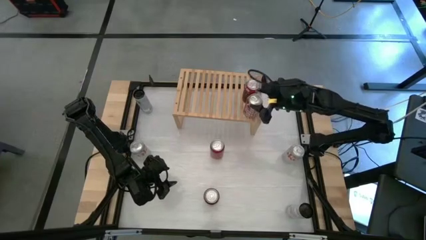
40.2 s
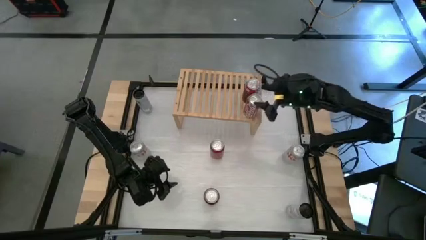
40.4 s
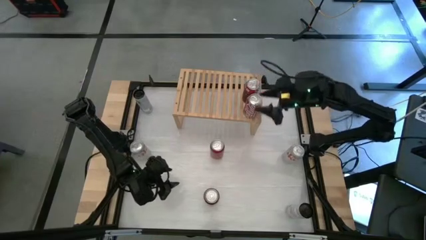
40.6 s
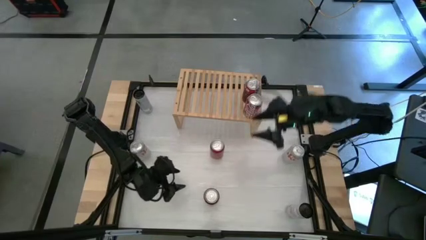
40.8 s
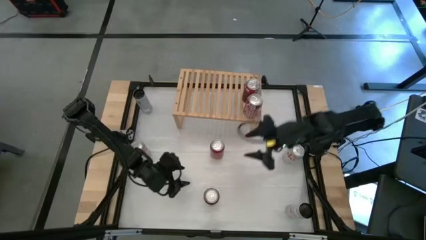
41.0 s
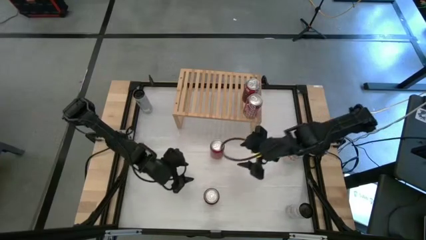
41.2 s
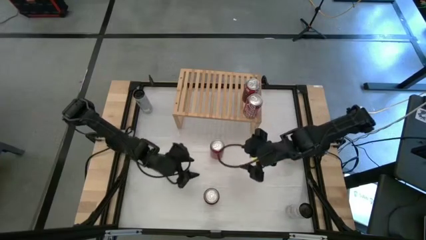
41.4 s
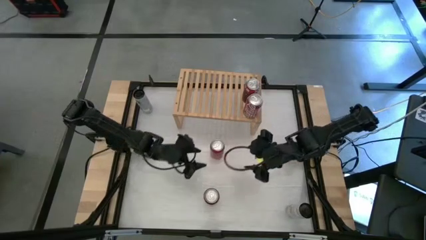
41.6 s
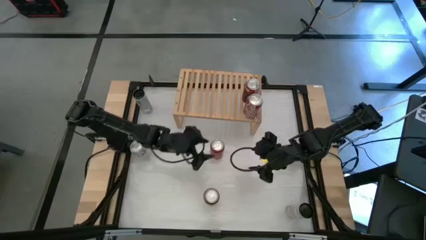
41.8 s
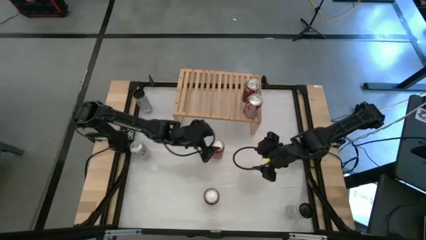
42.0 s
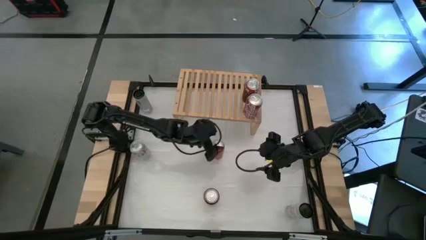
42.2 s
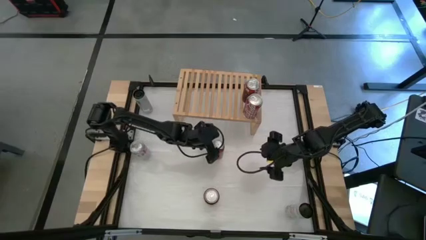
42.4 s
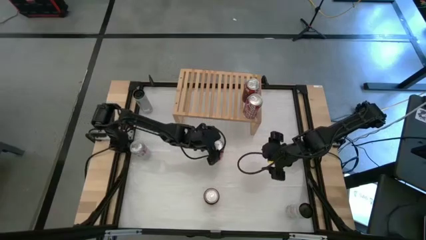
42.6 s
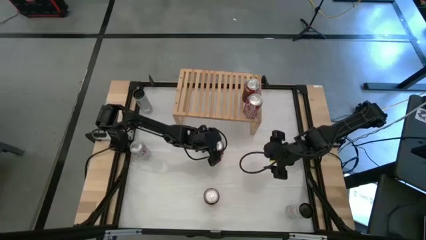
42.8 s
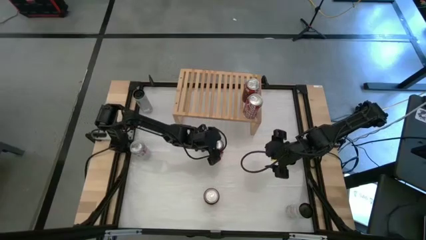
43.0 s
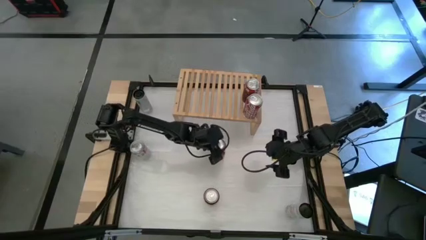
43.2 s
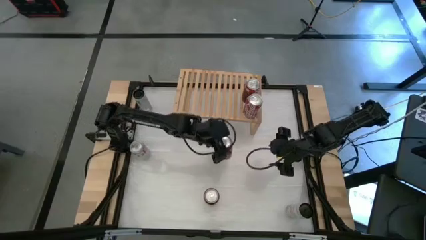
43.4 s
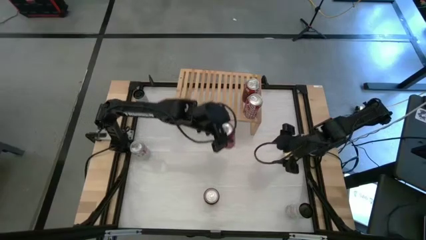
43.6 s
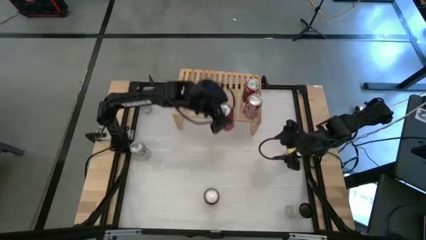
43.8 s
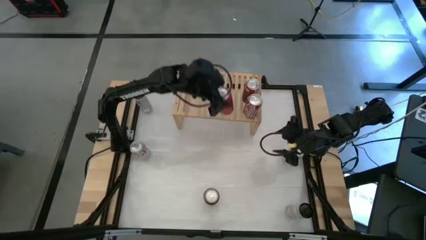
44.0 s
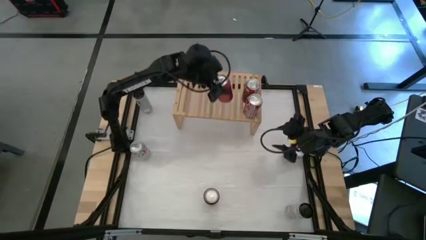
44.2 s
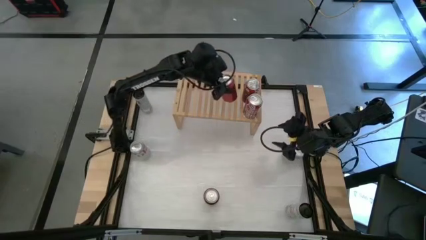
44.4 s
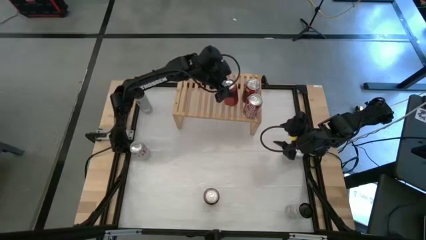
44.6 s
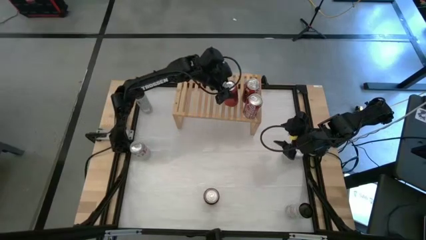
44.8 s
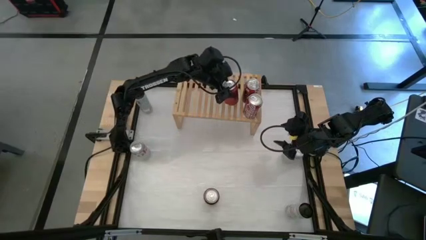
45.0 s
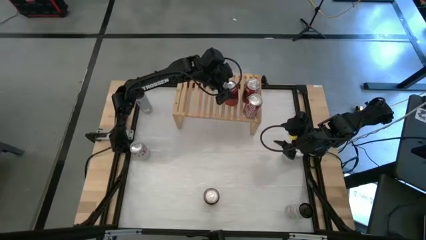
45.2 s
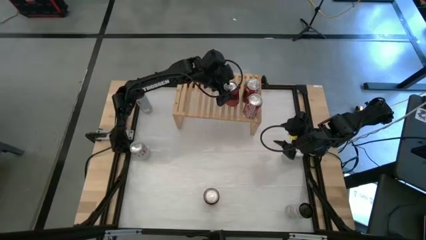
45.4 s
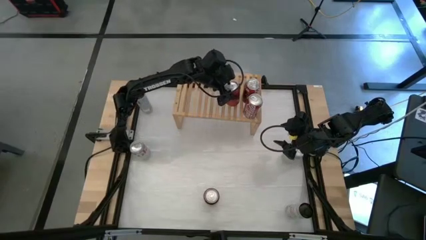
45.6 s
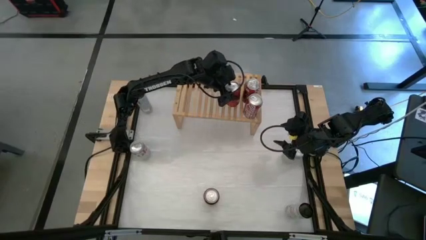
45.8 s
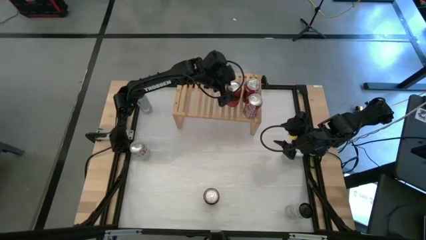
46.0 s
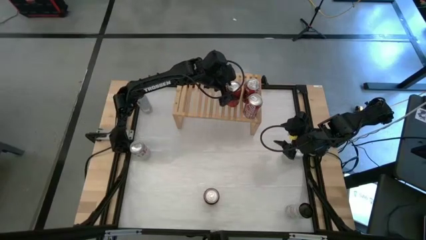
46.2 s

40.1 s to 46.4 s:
Task: Place canned beverage on shelf
Put the top red and black soda can on the shelf

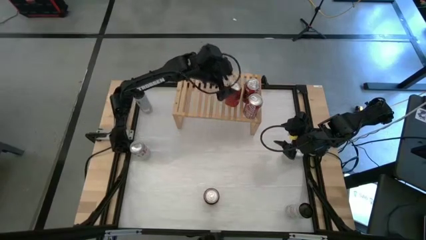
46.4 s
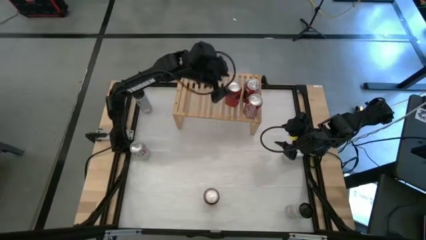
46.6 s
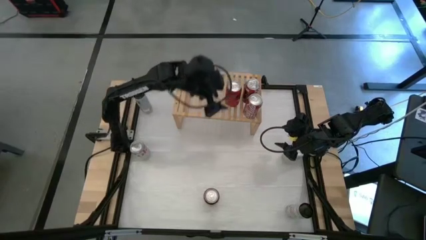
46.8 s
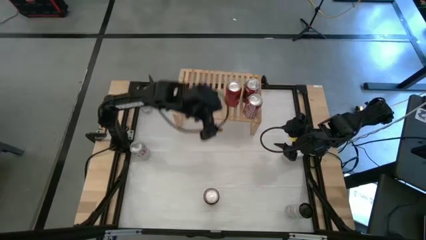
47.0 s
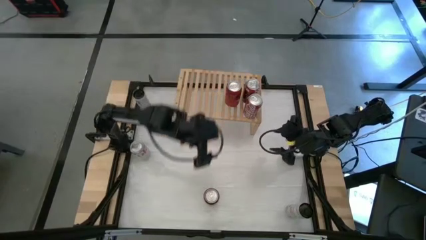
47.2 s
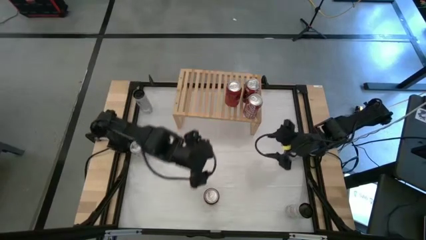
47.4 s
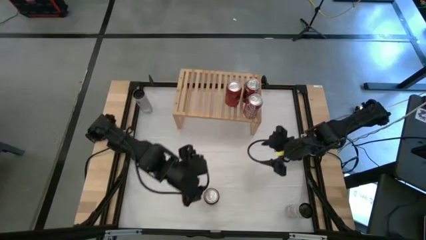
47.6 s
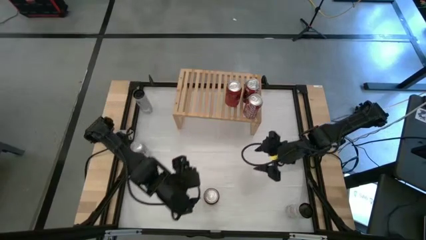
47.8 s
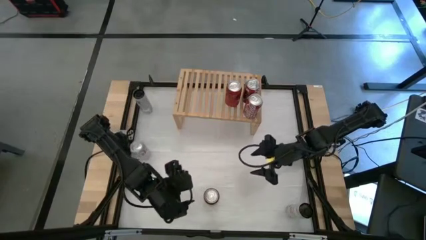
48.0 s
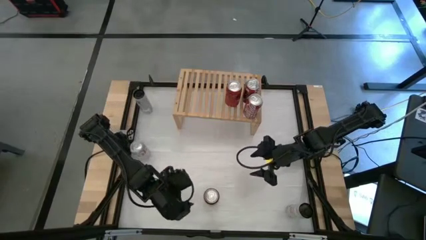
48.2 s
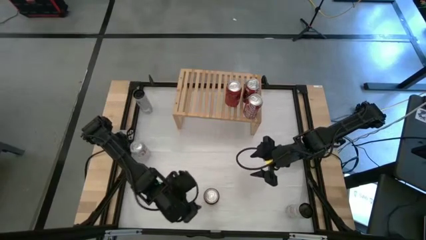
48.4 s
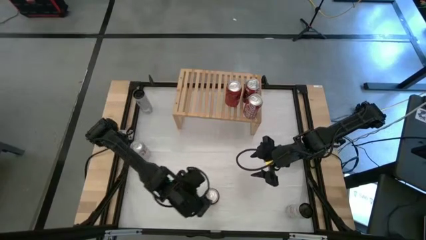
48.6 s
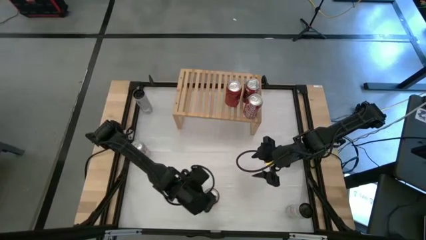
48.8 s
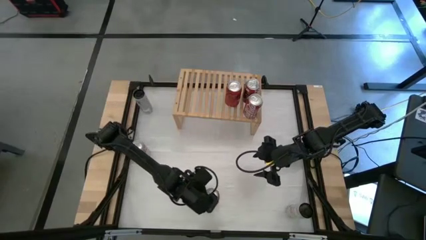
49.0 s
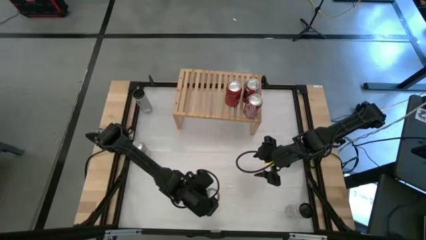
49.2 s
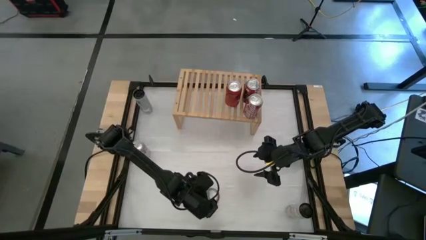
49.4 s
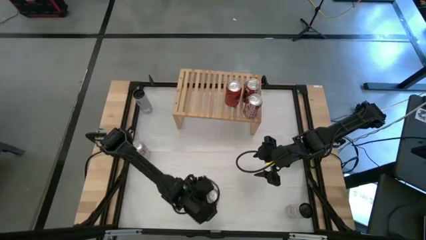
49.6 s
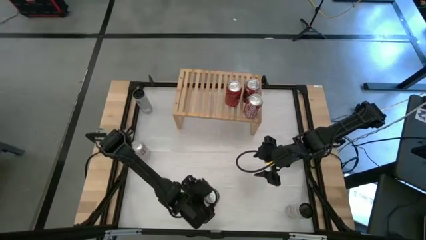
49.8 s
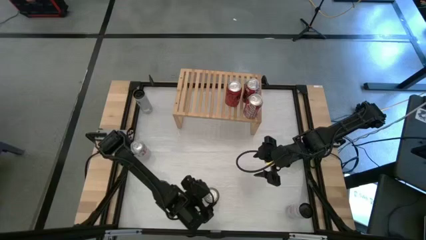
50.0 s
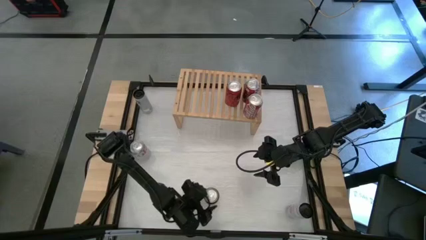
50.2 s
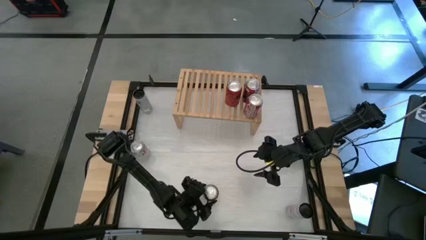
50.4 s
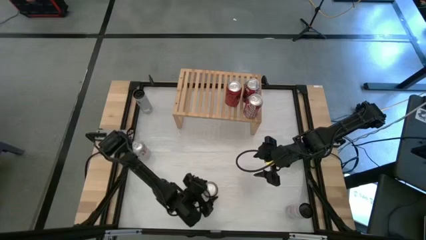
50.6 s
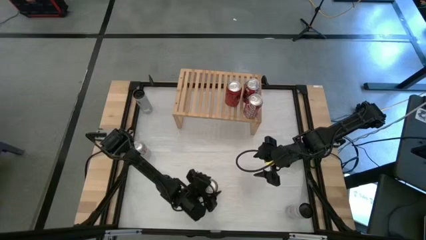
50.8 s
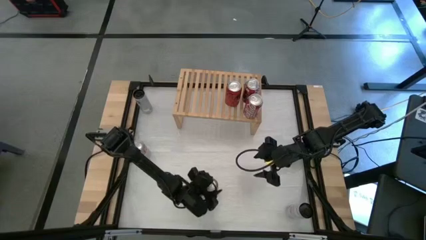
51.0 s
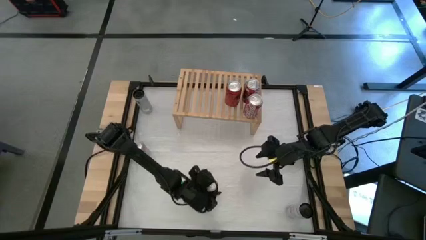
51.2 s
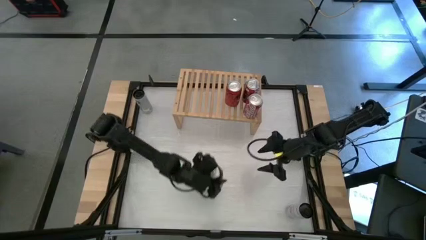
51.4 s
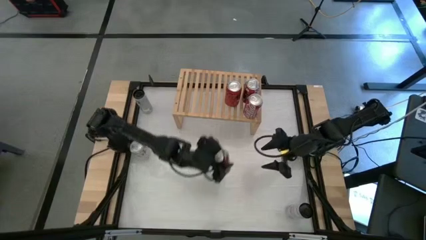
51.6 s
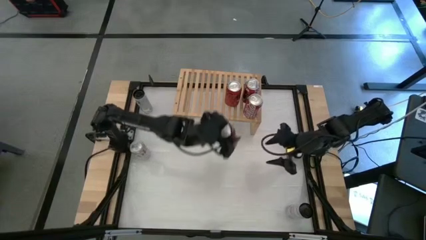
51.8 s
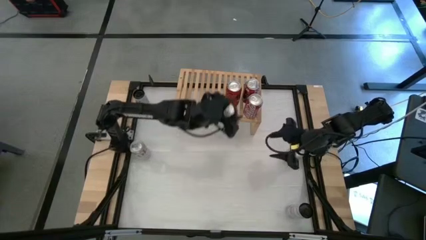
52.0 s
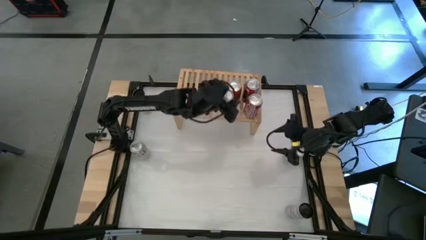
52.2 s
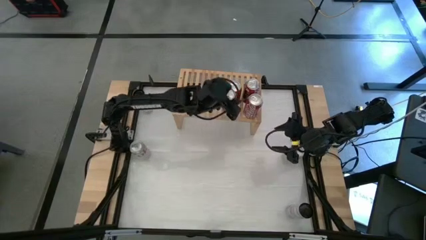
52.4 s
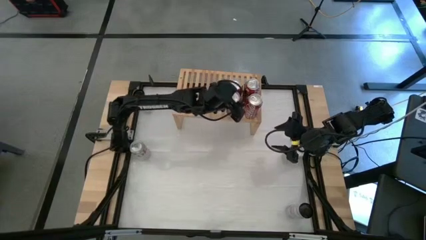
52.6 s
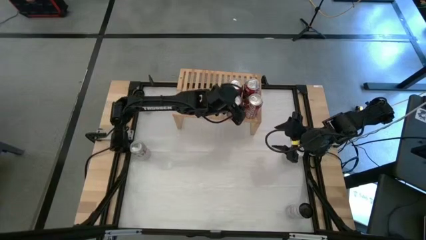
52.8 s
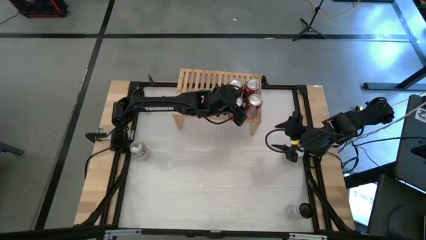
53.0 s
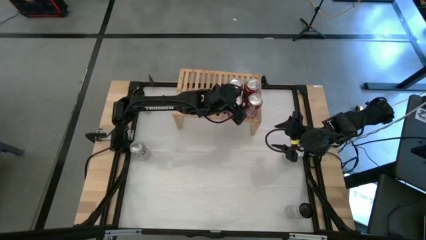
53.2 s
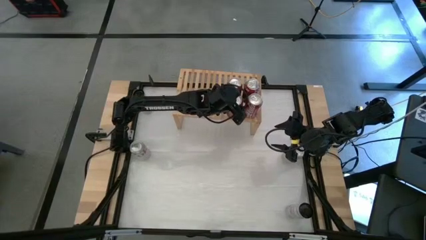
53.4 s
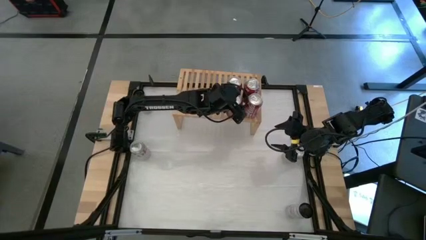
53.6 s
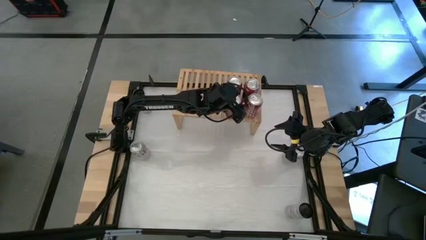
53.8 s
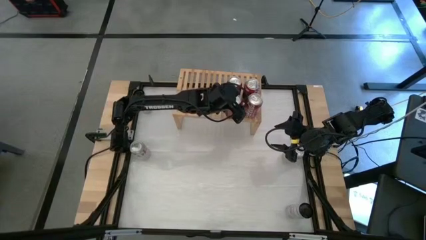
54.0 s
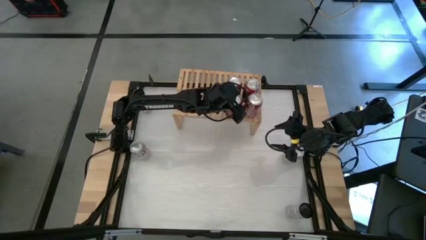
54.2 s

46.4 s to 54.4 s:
Put the red and black soda can on the shelf aligned with the other red and black soda can
